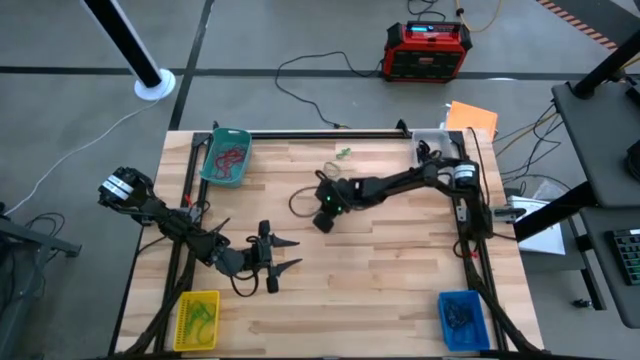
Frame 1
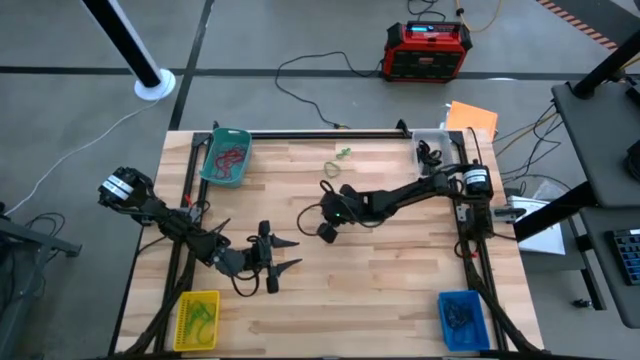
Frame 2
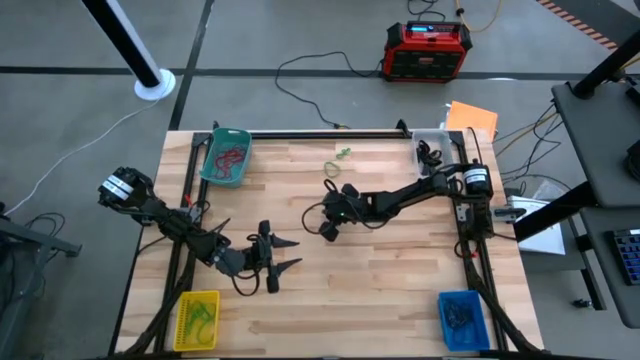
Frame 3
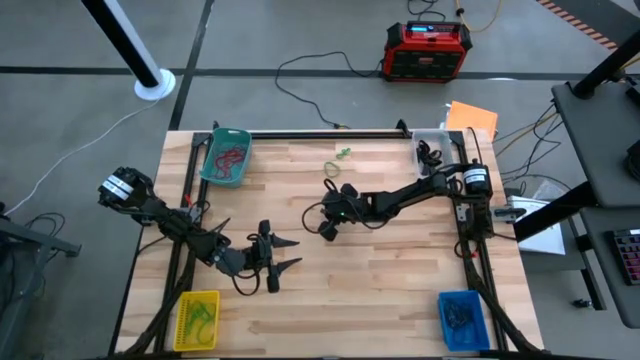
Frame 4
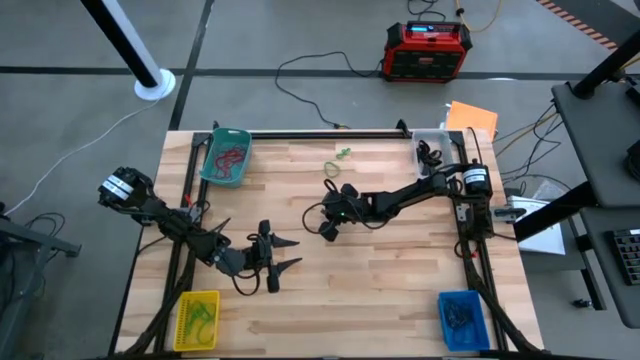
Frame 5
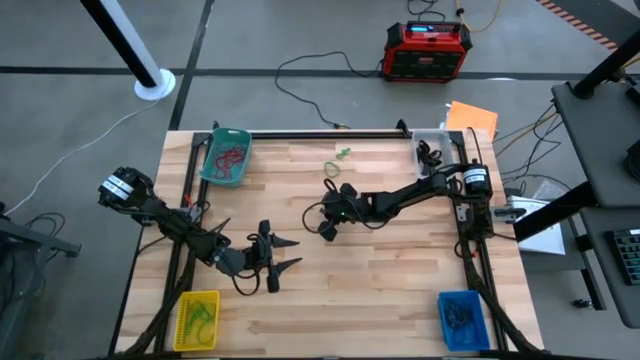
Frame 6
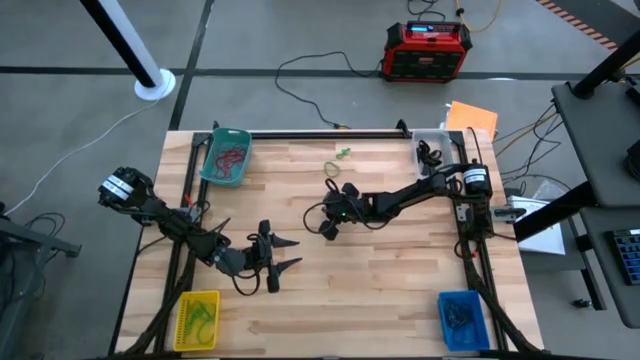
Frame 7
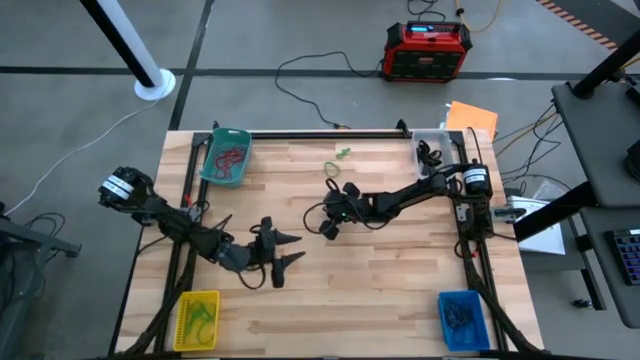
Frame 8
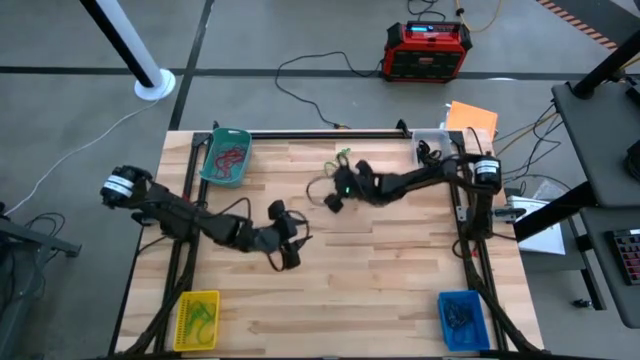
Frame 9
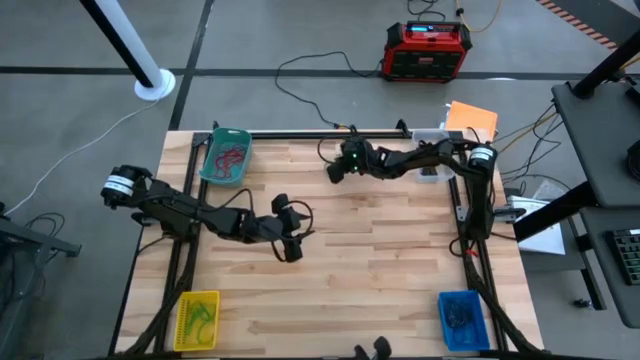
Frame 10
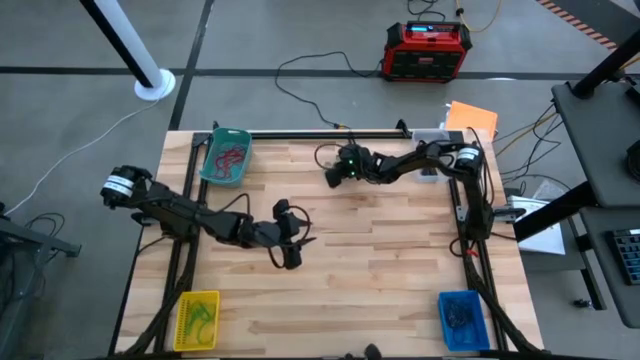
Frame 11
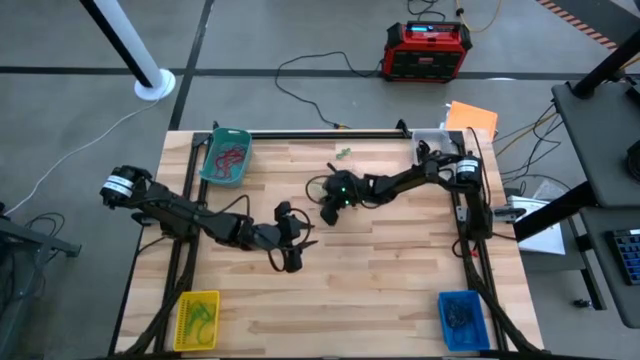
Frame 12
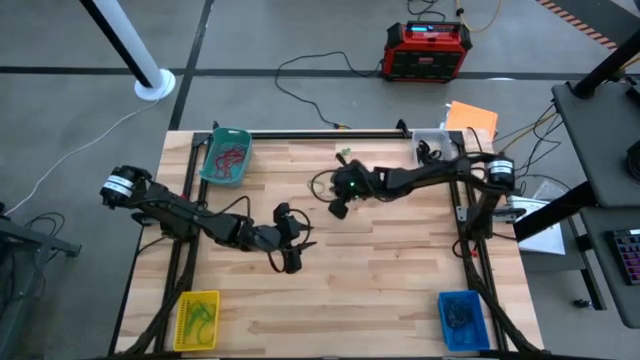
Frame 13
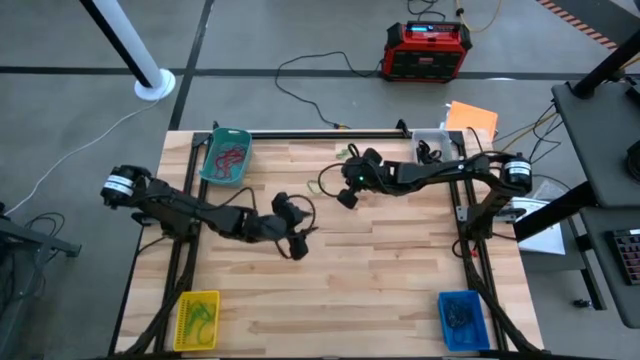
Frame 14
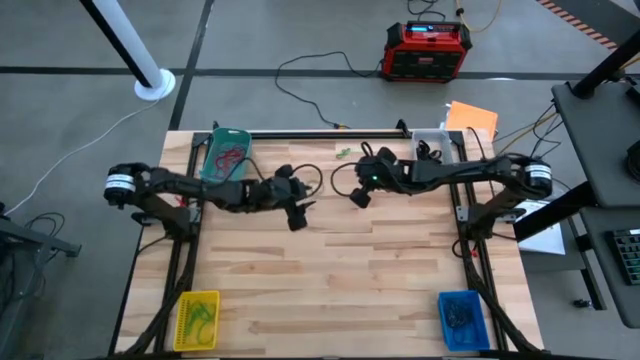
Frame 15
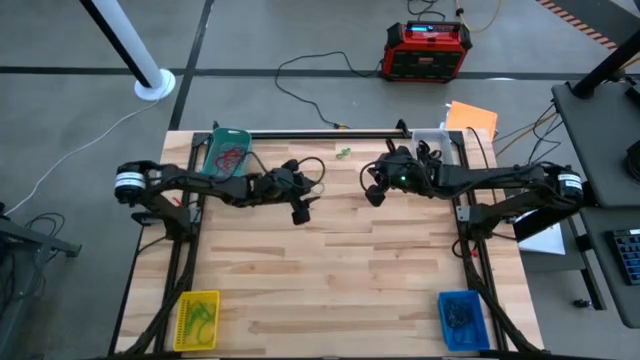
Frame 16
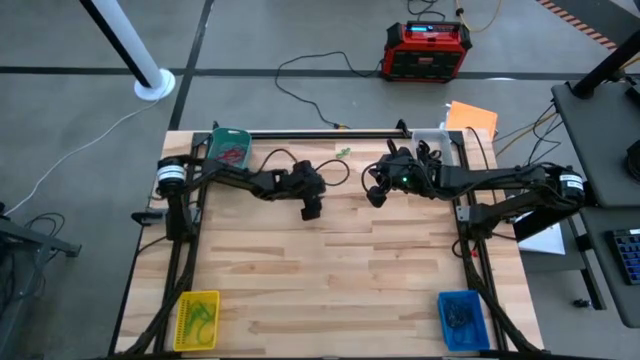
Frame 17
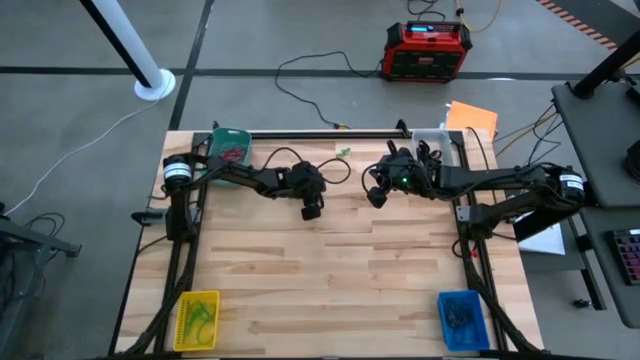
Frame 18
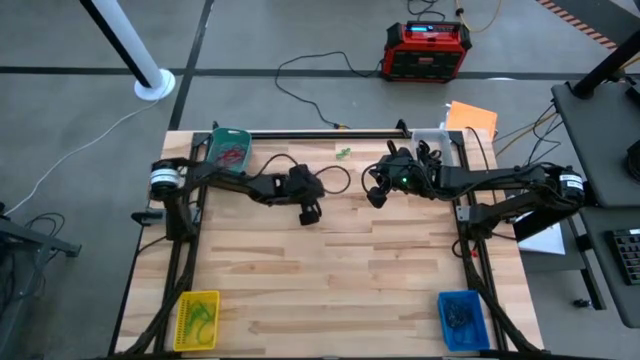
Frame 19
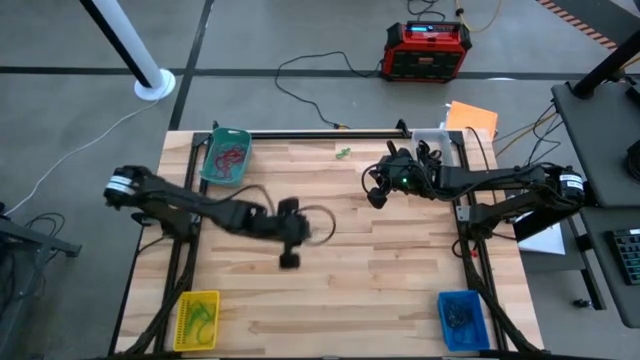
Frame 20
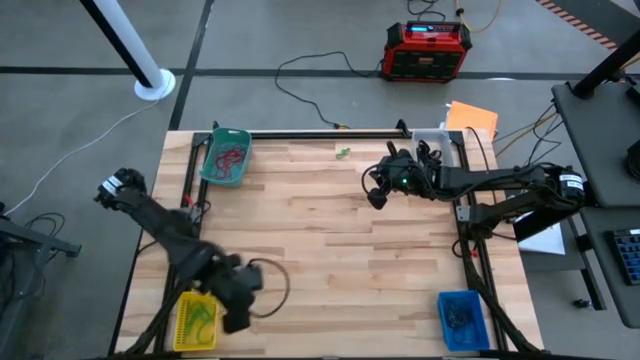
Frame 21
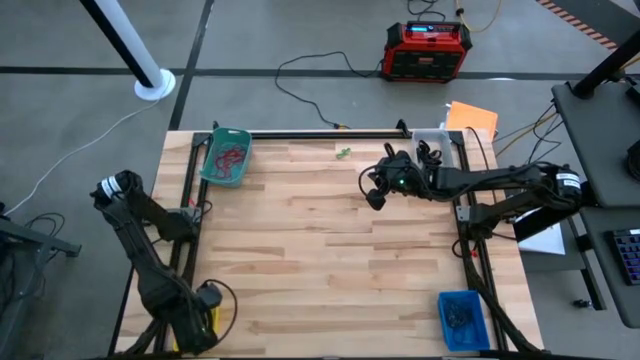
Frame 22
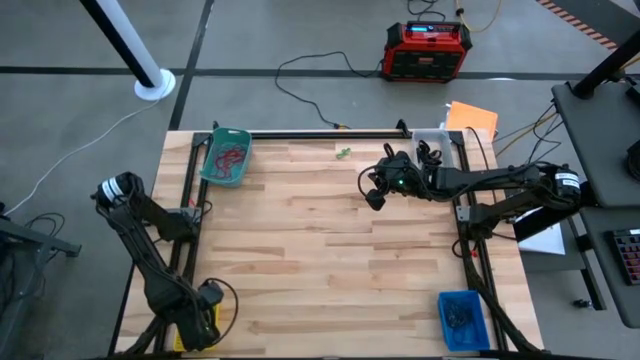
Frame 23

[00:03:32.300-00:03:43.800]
Task: Sort rubber bands into baskets
Put the green rubber band into the yellow bin

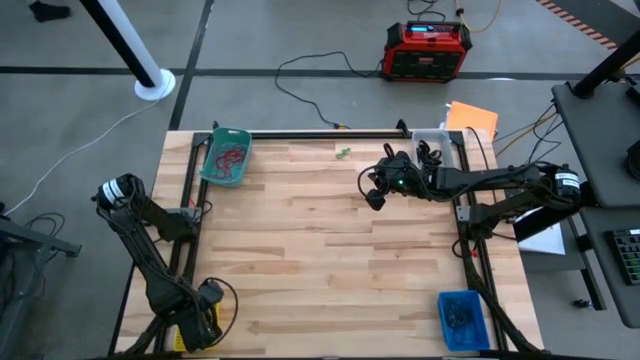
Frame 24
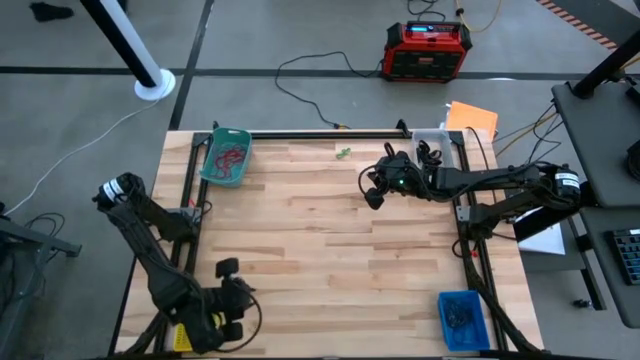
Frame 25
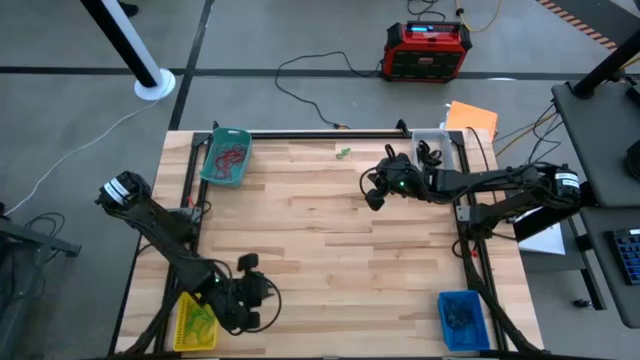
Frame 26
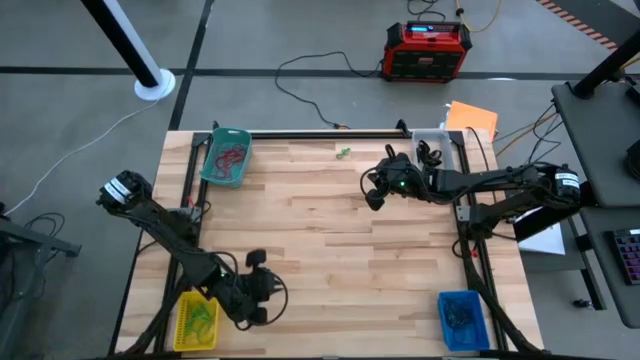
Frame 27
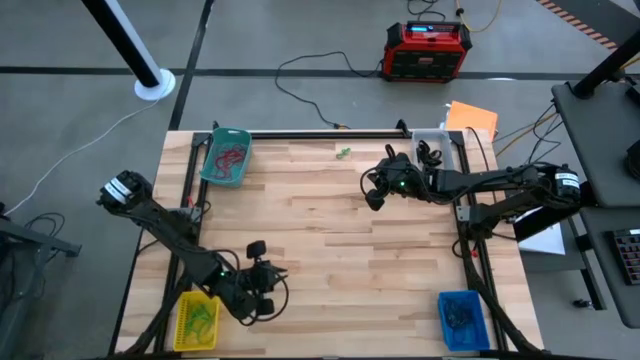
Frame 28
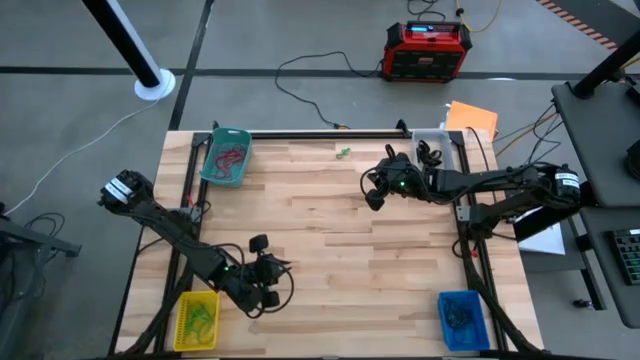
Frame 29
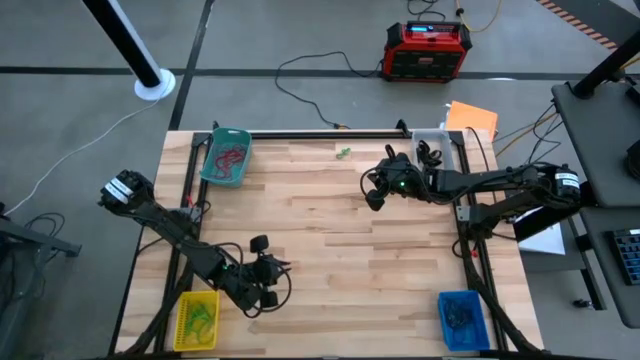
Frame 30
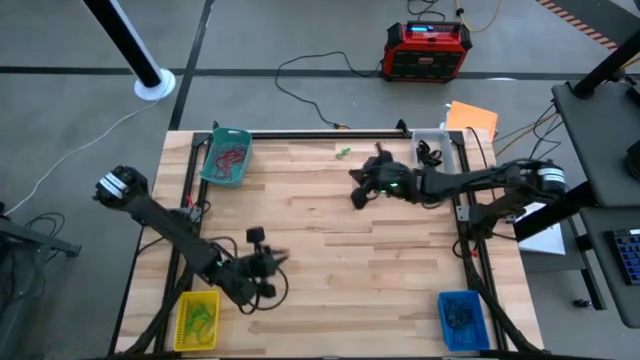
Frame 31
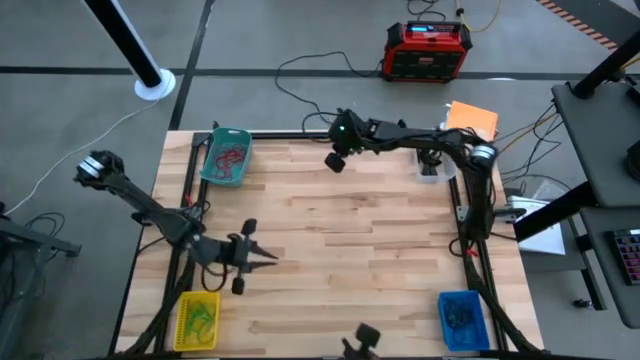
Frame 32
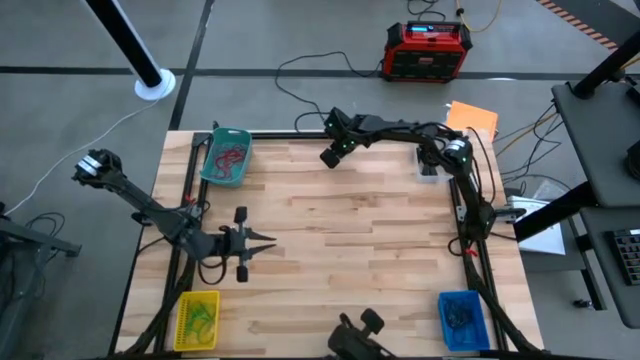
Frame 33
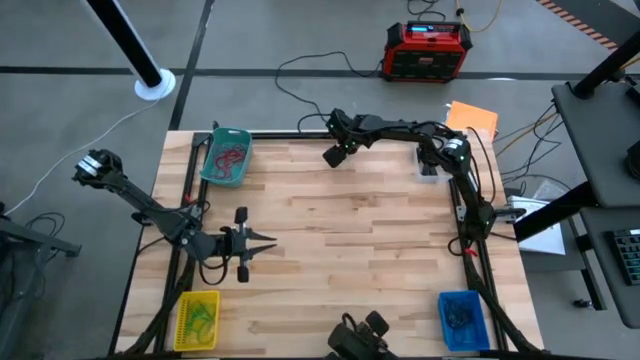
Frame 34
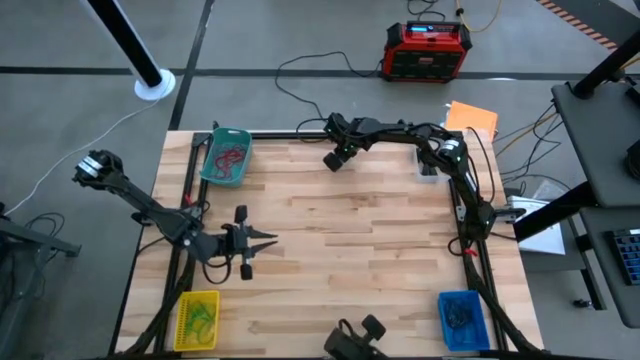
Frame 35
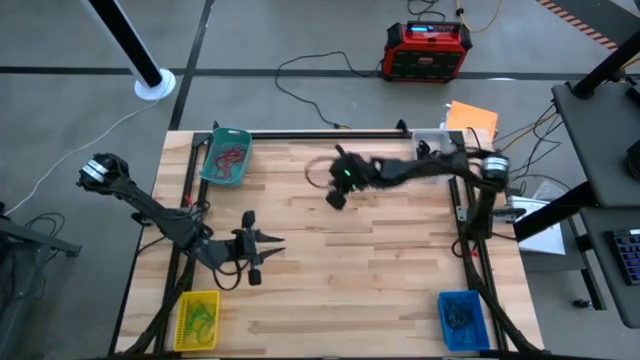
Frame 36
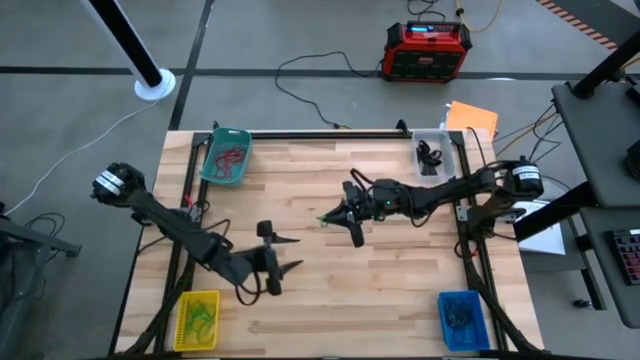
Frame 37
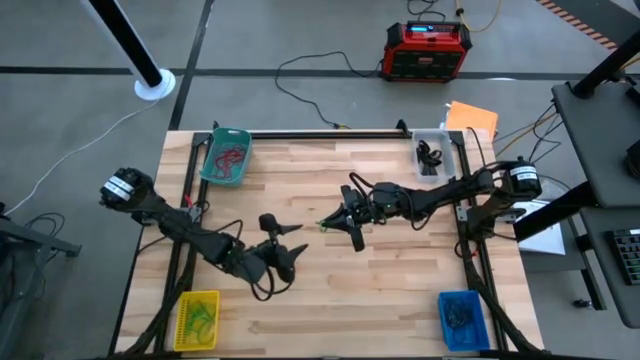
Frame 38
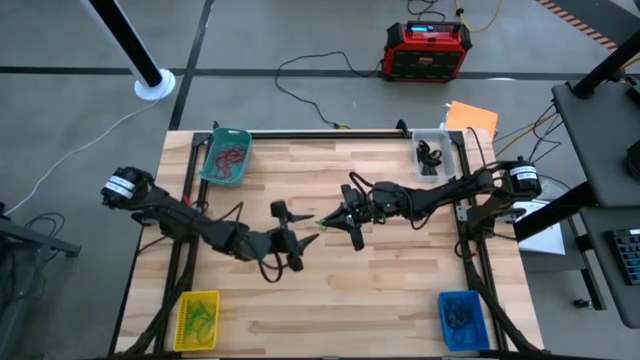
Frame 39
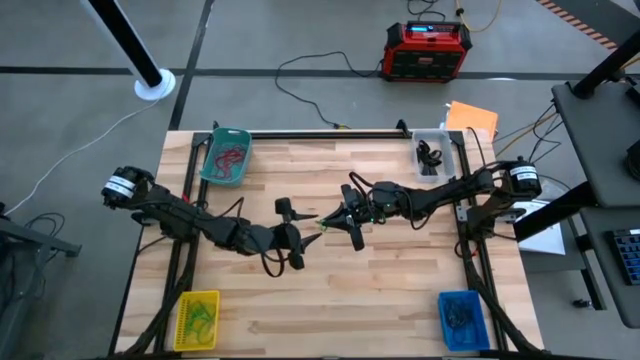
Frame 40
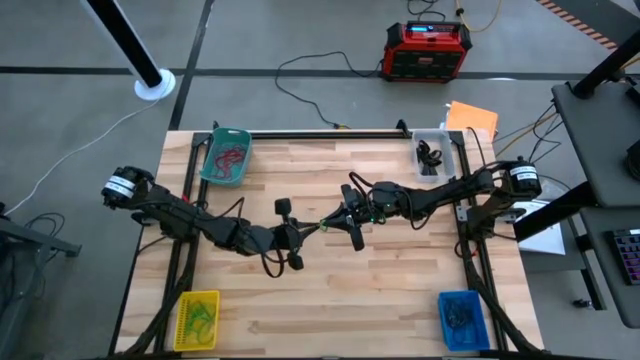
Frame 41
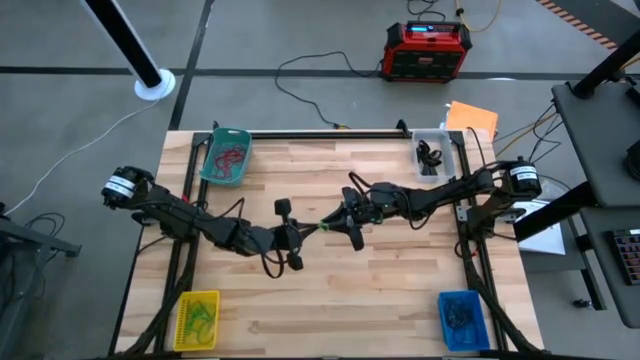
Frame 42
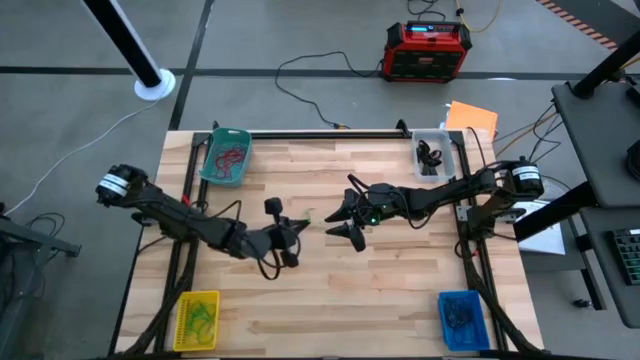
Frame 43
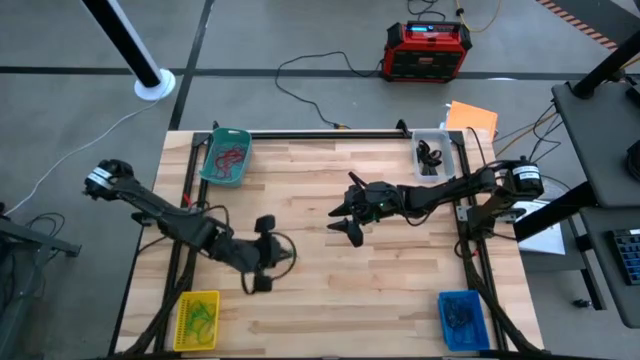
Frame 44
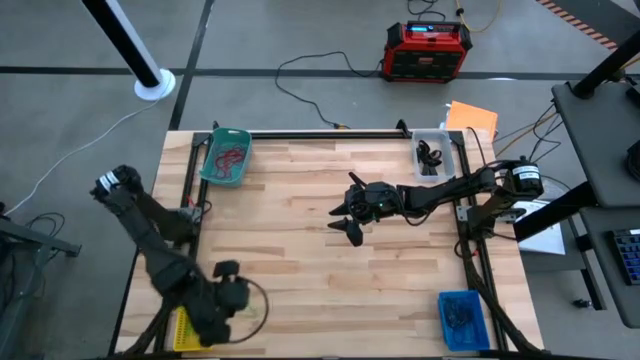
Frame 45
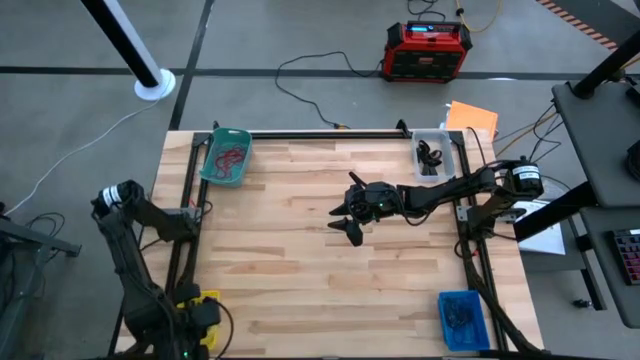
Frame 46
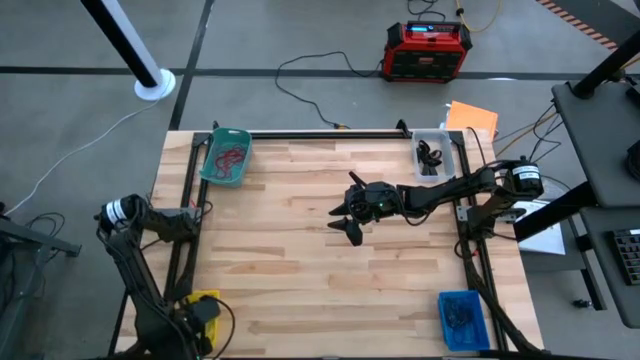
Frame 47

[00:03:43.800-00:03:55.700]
Put the green rubber band into the yellow bin
